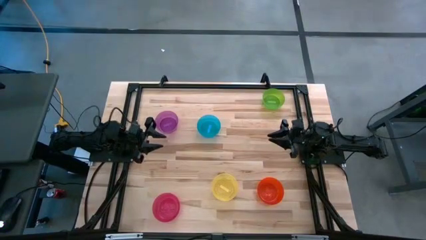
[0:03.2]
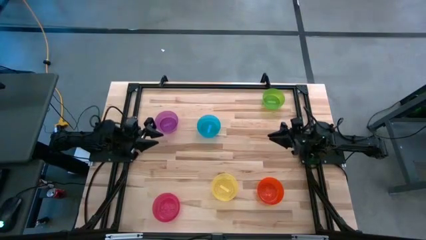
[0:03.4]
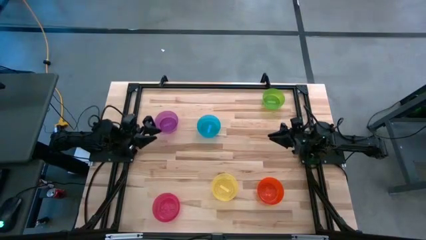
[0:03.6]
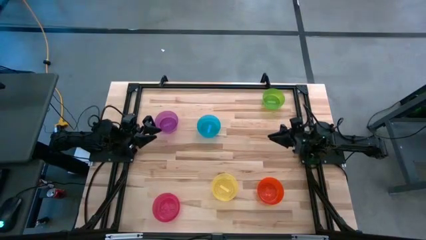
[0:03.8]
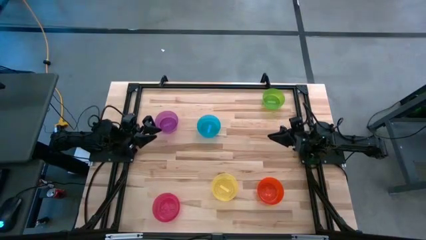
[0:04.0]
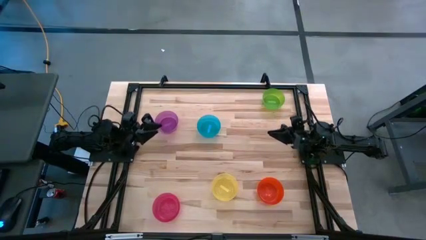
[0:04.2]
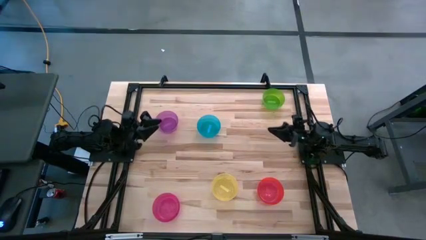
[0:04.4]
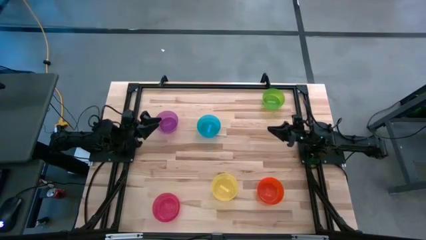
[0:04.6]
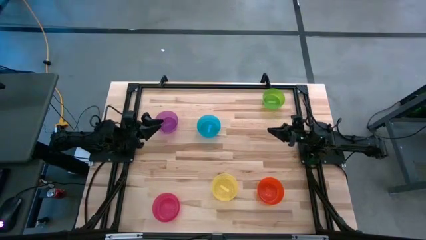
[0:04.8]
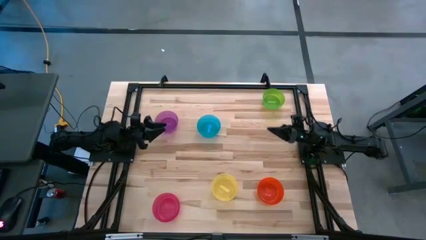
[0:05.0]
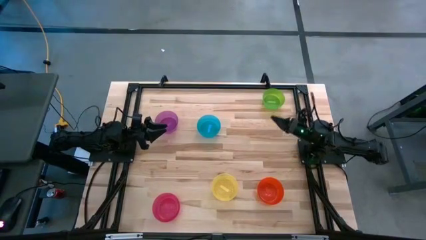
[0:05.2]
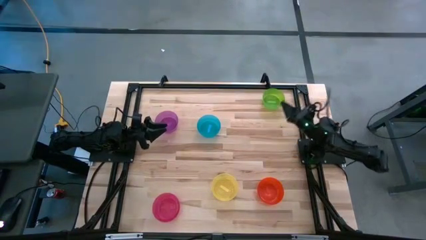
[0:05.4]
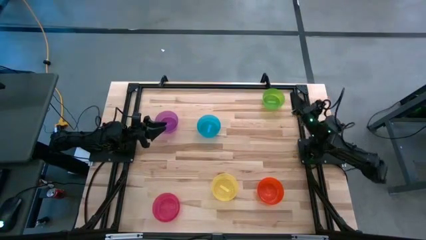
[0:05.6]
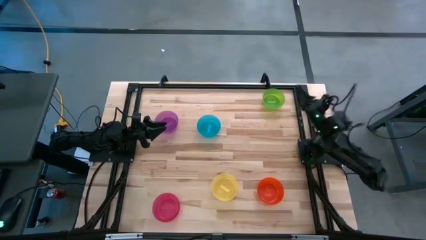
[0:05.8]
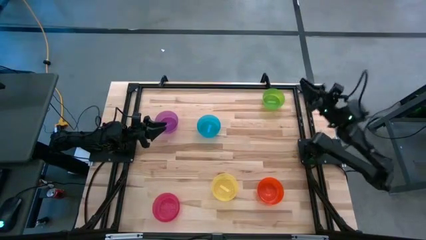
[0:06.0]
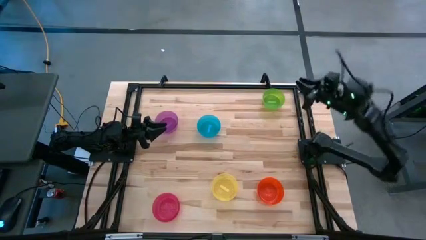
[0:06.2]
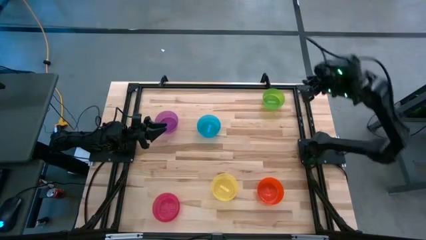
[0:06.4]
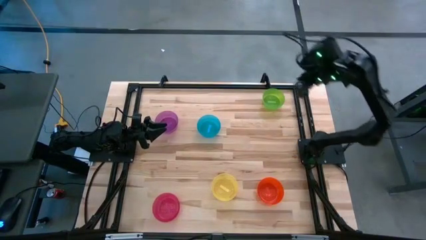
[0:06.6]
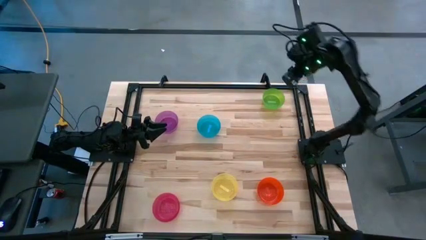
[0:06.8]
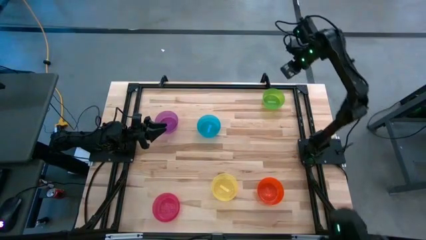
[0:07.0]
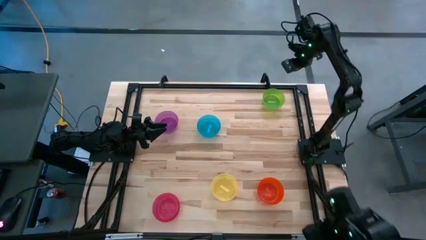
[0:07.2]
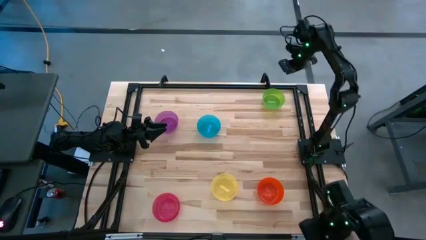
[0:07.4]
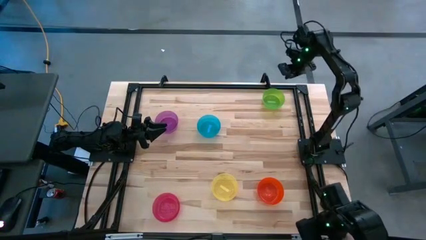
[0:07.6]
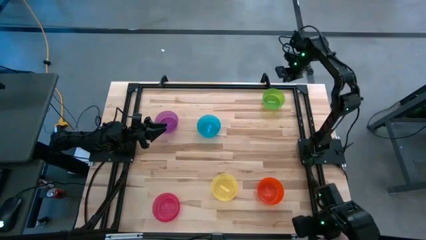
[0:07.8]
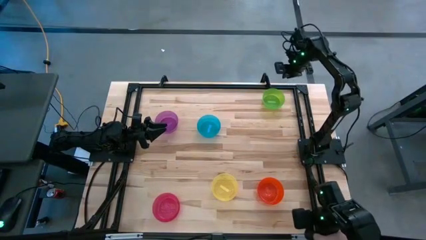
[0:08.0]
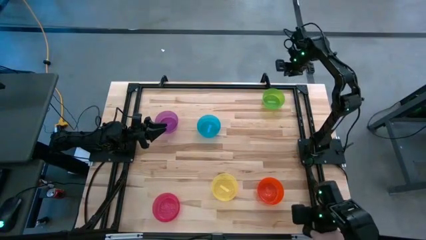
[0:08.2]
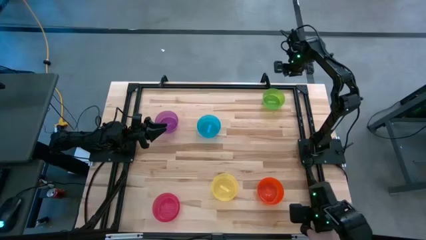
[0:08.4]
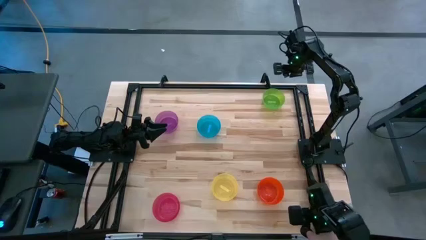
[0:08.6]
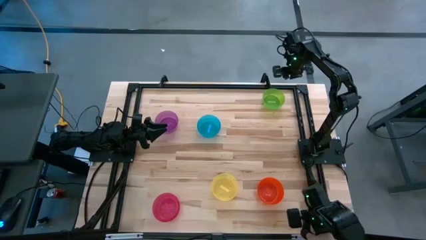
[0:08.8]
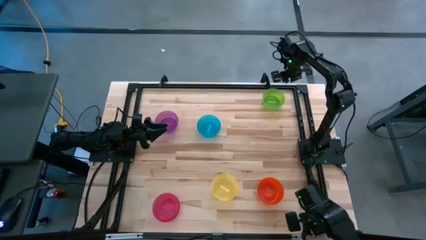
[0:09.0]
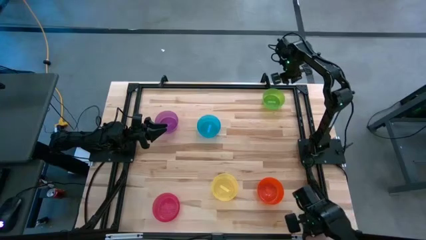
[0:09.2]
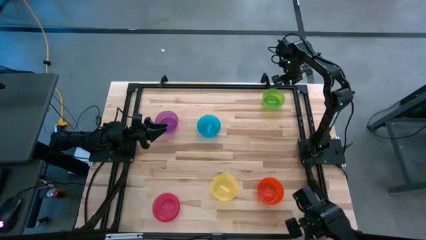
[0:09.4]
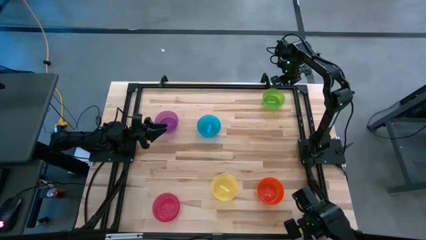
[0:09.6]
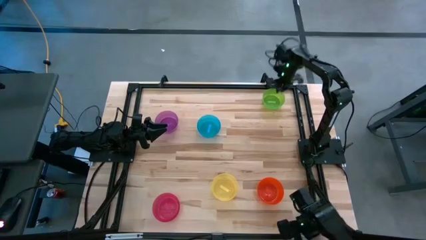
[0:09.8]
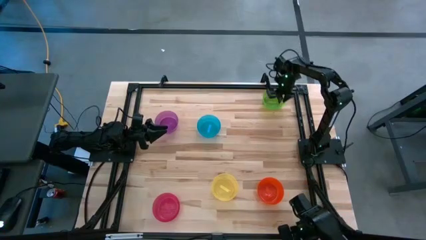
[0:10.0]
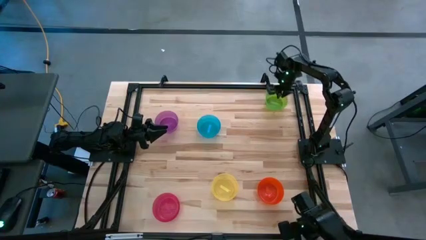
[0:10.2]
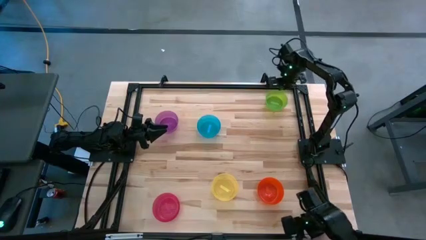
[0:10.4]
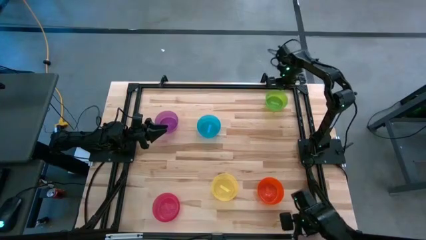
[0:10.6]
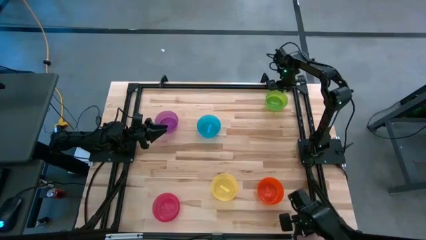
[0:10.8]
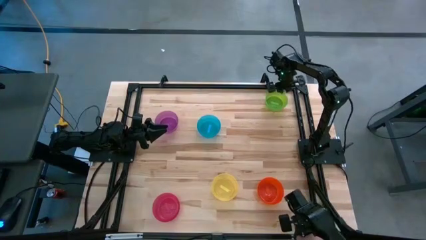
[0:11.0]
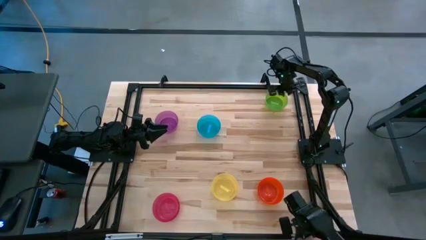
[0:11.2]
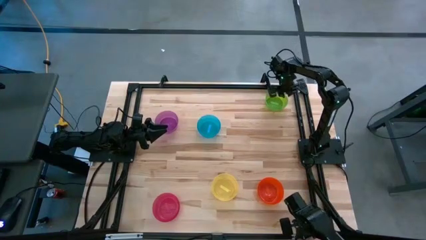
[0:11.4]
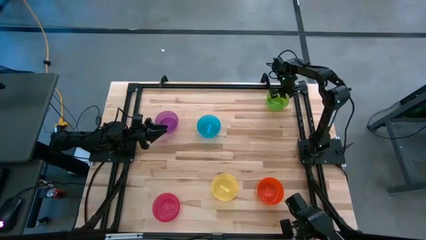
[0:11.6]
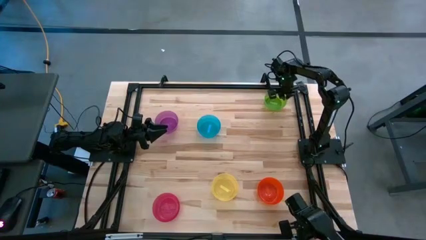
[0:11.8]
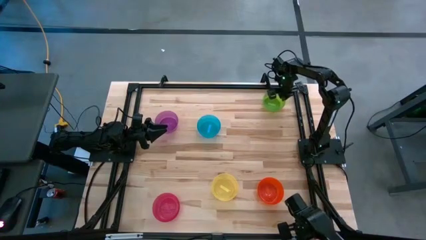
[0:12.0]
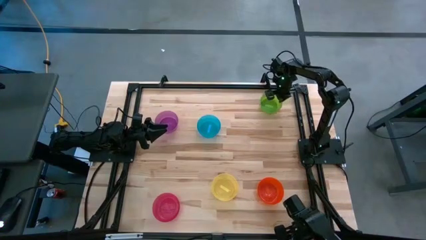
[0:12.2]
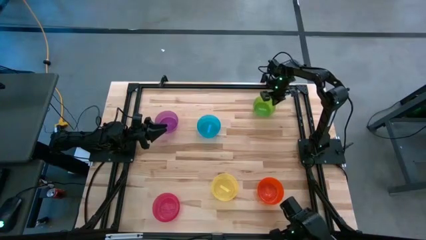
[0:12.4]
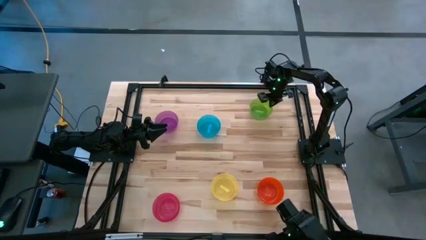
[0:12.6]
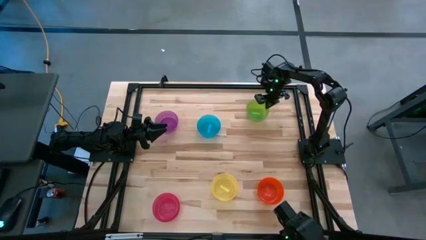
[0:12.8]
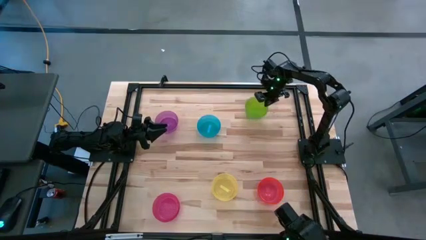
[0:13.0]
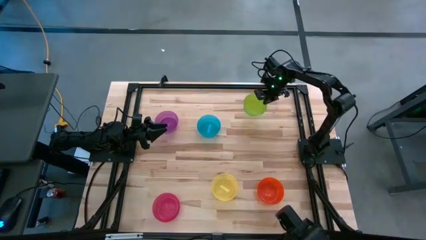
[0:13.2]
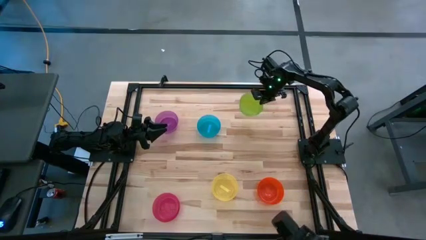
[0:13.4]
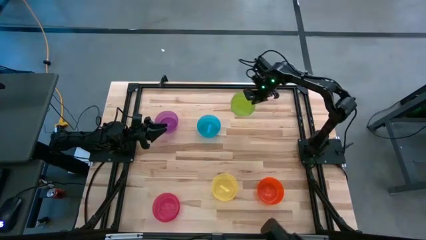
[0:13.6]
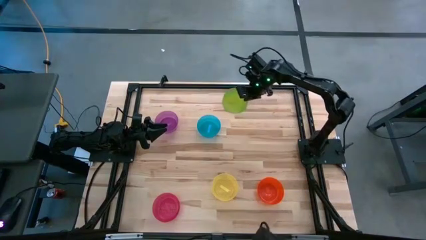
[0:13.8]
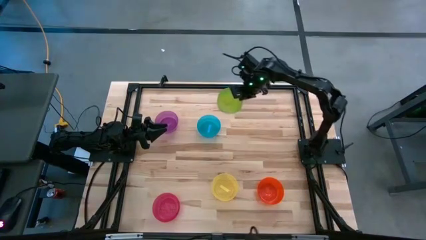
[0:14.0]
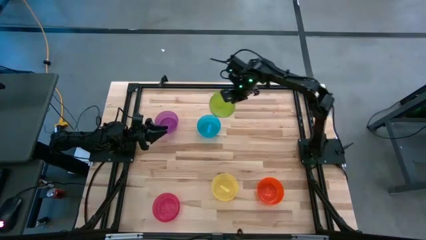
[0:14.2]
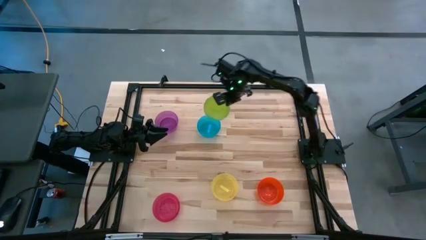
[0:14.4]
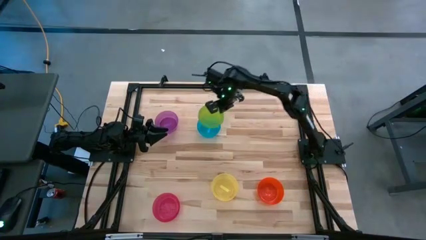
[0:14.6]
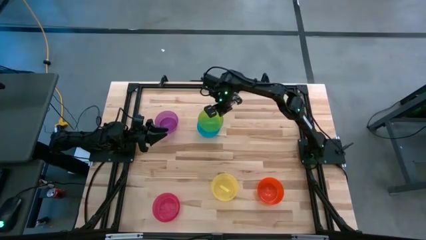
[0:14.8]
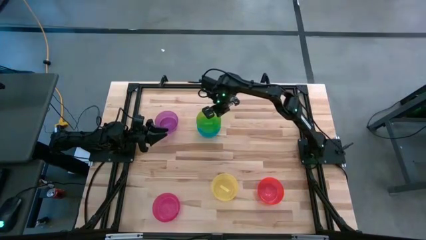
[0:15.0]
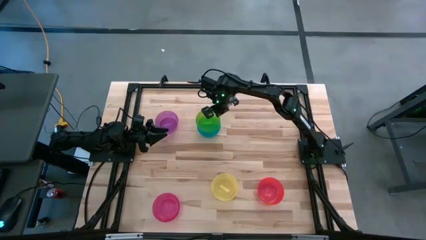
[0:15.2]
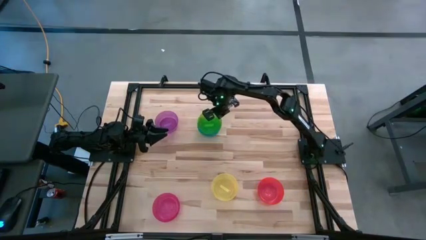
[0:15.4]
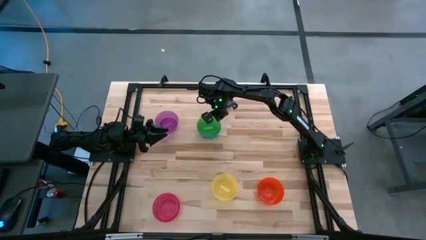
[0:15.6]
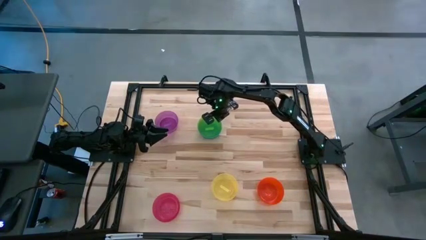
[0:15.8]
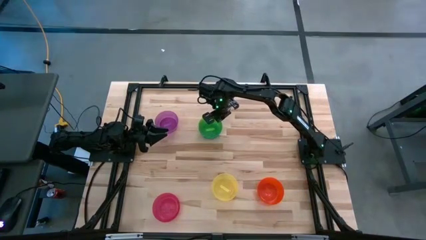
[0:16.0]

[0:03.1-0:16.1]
Task: Nest bowls inside each other
Stack the green bowl on the blue bowl
